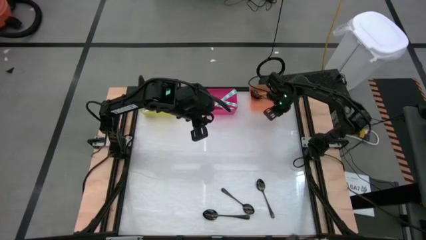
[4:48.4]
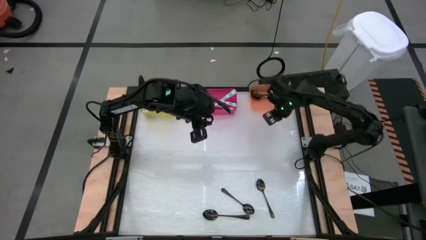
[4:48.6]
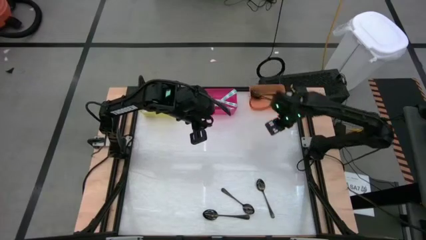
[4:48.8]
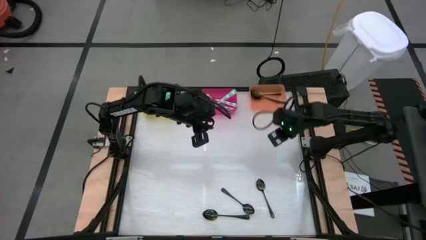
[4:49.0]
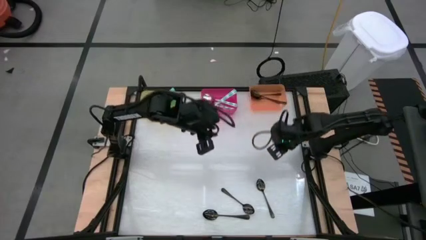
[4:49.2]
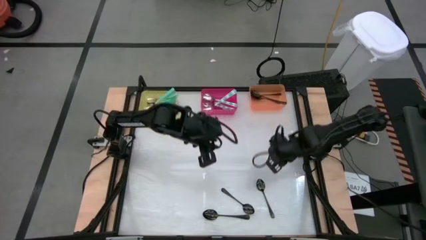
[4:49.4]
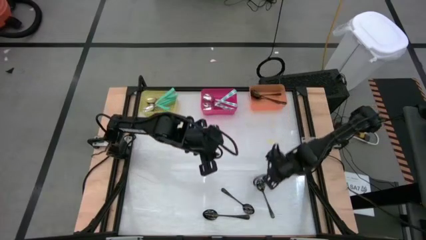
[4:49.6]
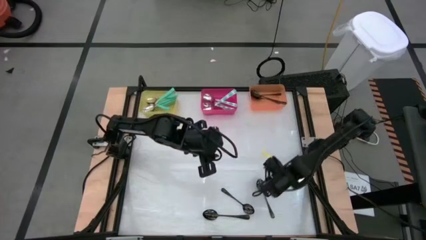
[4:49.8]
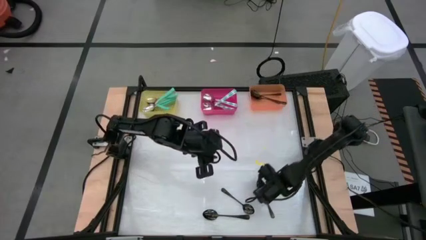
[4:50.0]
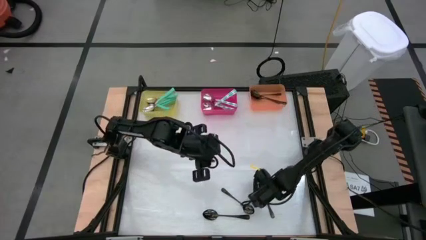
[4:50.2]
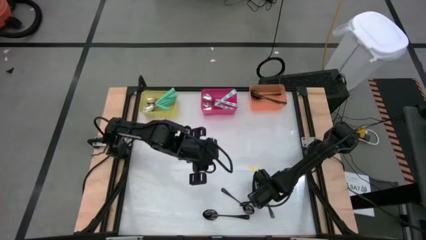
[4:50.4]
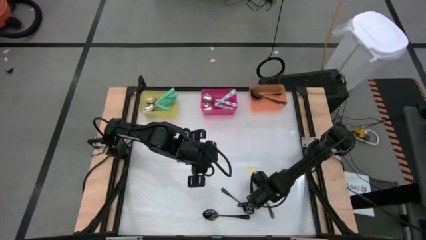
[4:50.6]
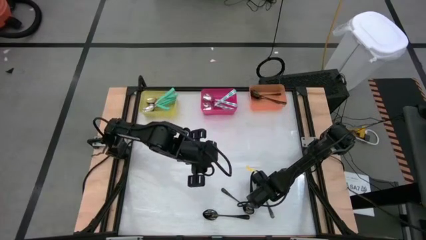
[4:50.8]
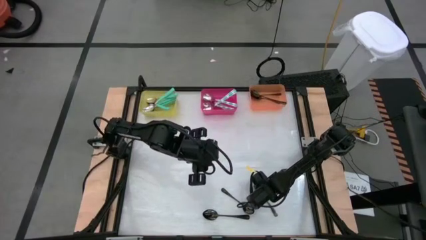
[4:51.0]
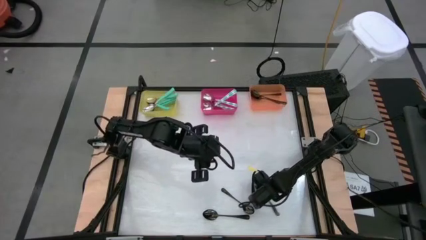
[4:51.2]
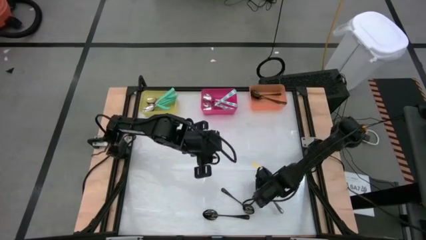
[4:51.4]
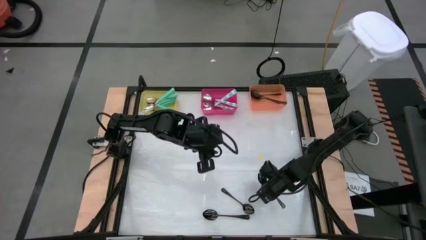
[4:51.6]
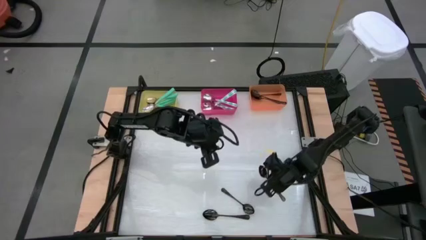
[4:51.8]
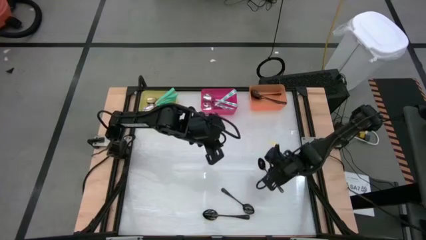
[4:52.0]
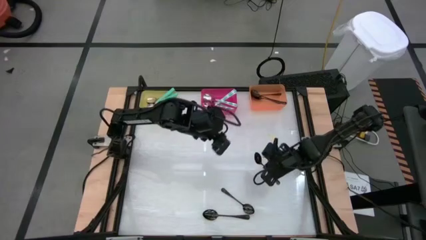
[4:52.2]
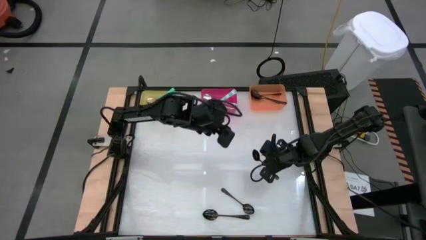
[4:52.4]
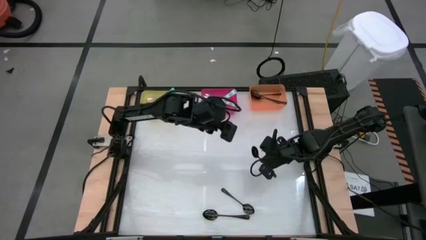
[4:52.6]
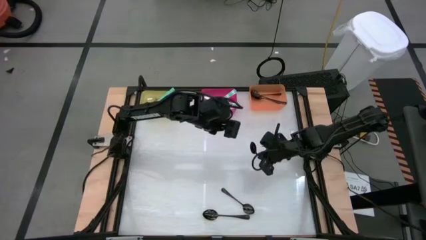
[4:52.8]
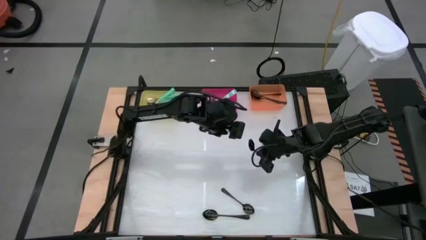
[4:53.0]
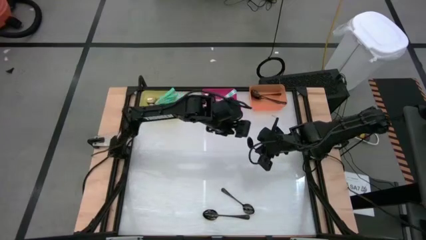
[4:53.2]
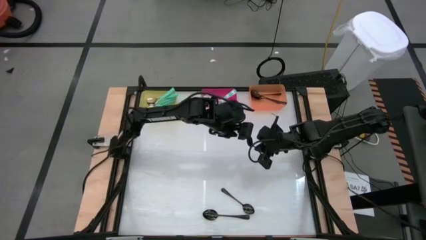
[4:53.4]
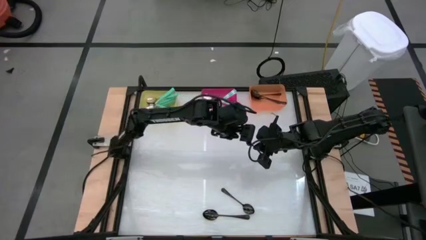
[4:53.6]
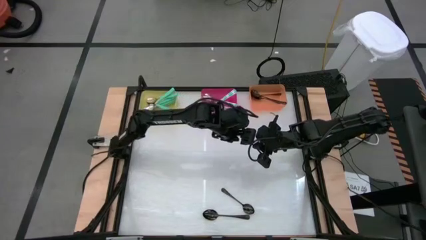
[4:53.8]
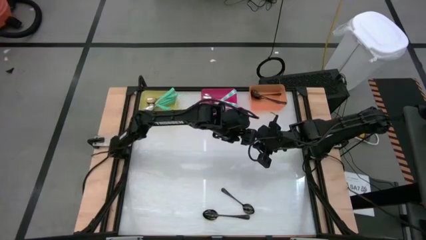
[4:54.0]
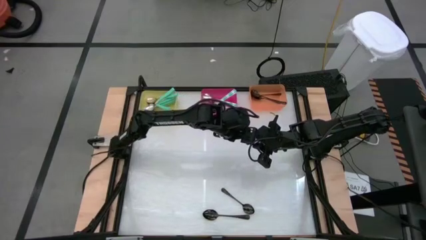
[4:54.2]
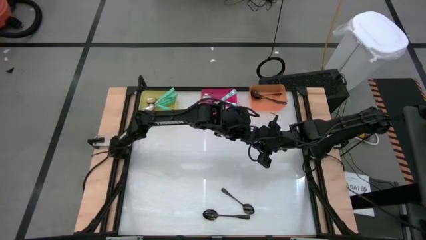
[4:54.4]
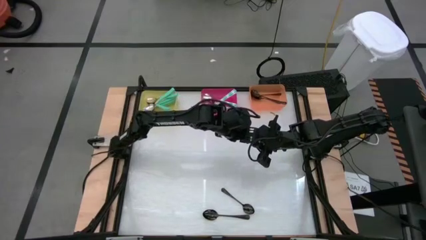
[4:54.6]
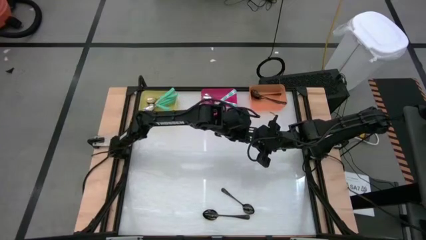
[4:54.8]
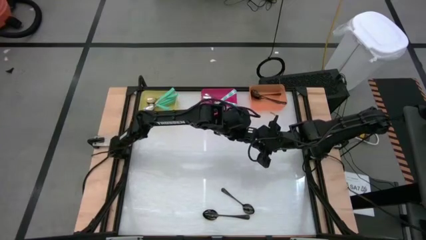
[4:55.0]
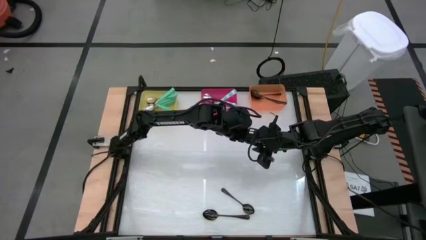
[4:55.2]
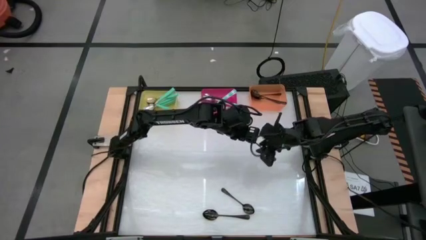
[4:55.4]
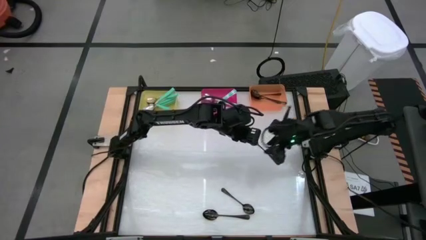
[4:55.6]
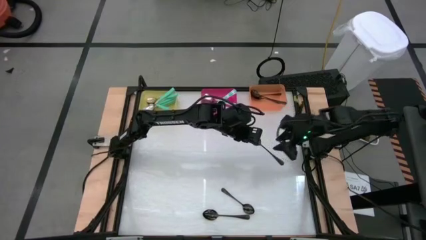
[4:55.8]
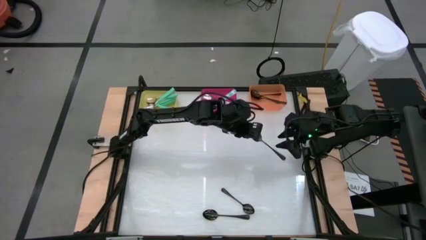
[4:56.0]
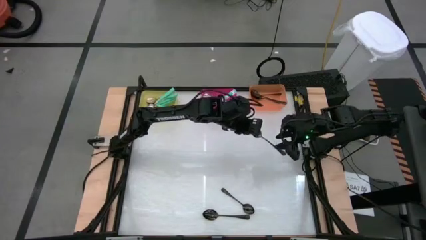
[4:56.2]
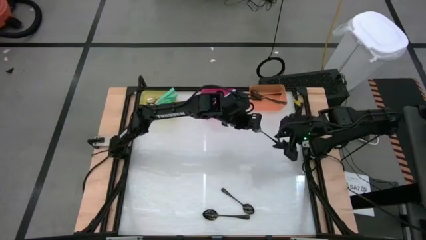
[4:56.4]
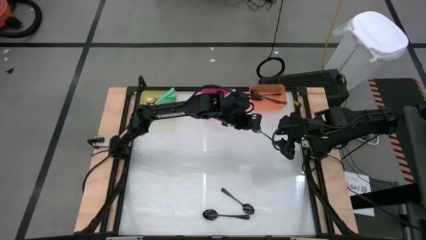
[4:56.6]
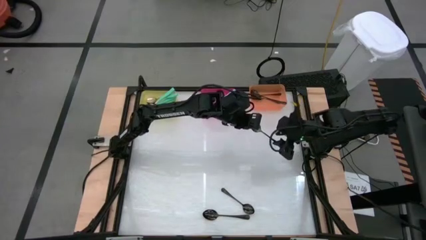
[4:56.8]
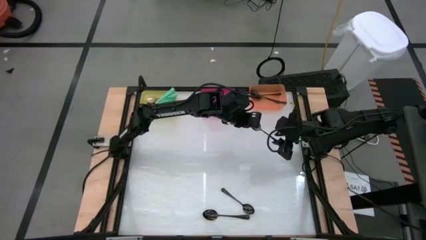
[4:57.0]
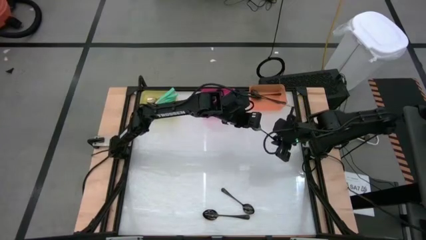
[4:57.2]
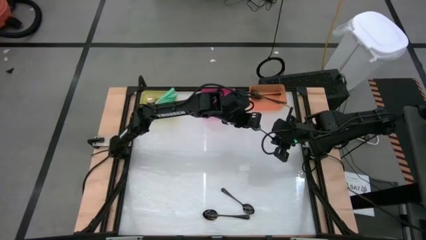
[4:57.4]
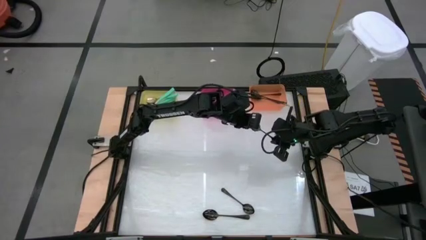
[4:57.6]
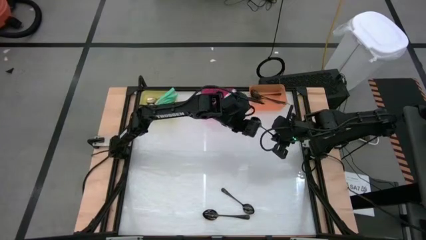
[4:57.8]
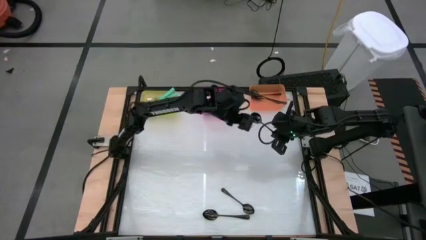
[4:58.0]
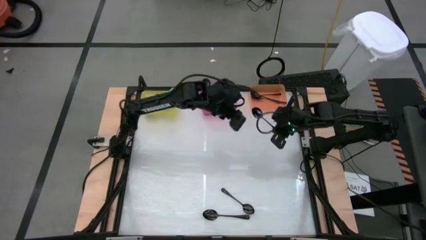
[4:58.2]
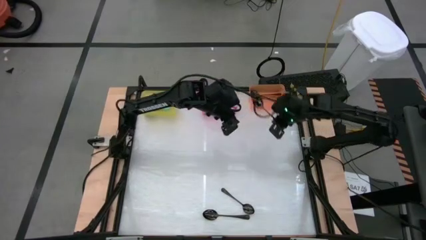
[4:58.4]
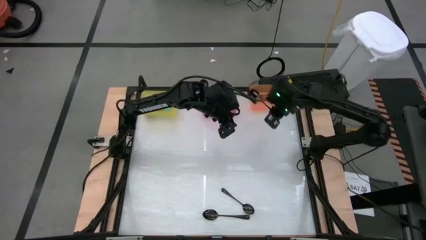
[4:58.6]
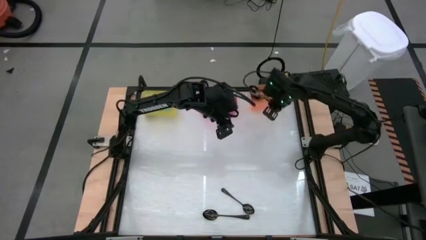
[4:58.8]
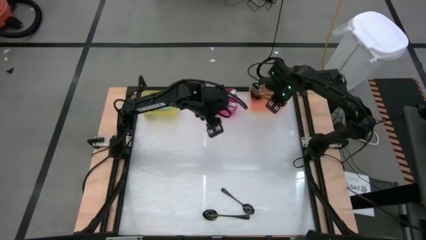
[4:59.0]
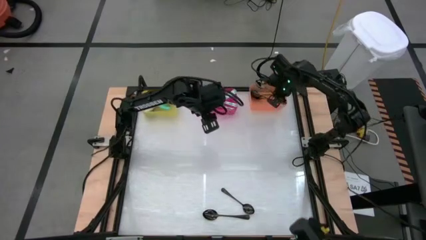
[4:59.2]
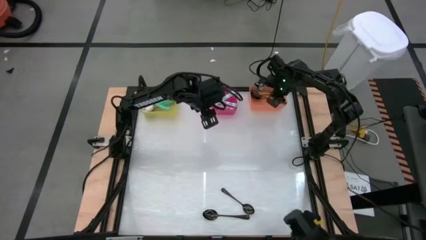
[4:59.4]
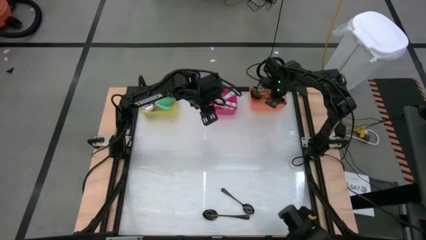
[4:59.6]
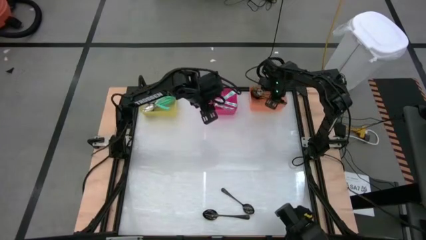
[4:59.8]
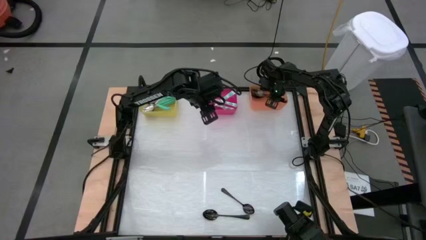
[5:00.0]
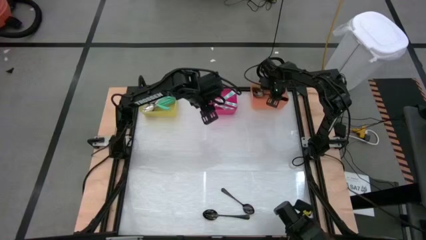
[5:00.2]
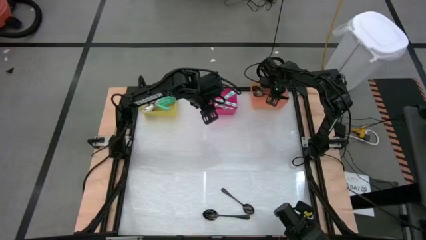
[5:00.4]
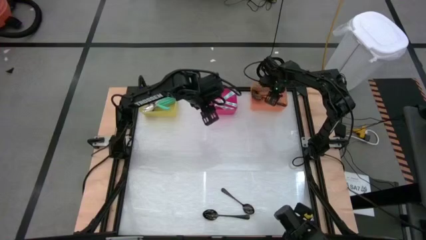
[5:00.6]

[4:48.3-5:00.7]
Task: Sort silverware by color (type)
Put the black spoon into the orange bin
